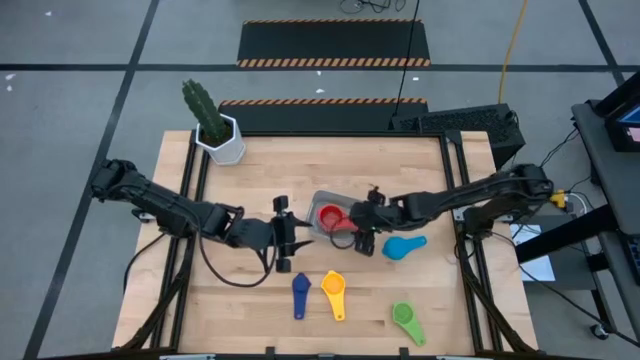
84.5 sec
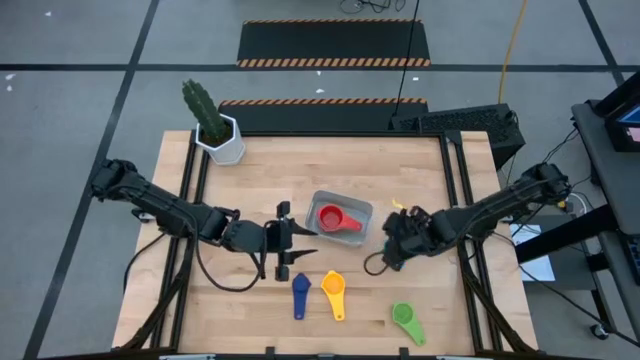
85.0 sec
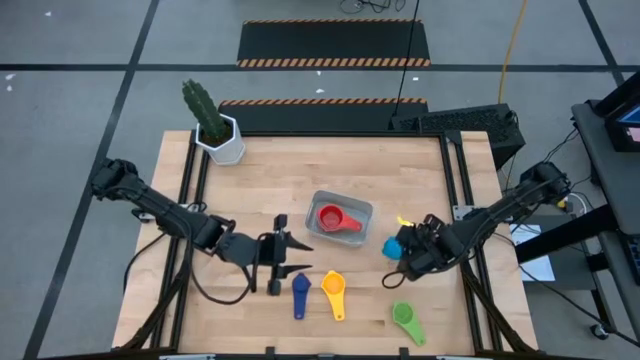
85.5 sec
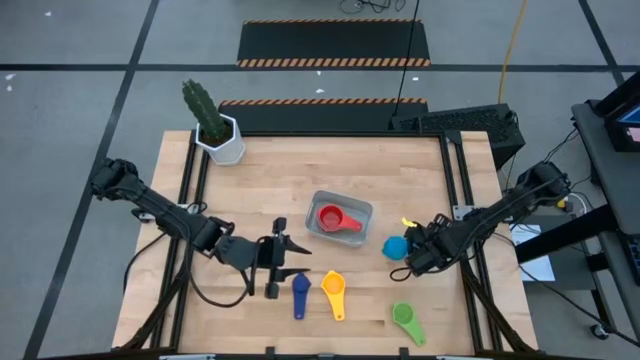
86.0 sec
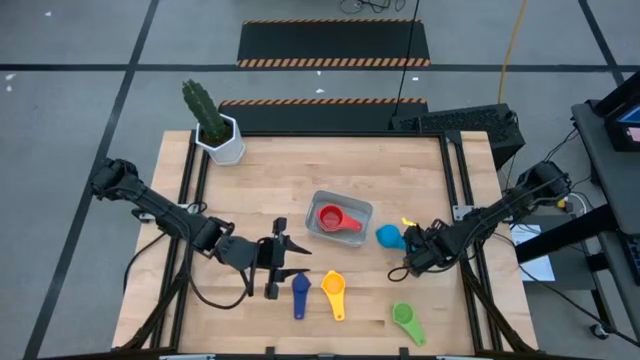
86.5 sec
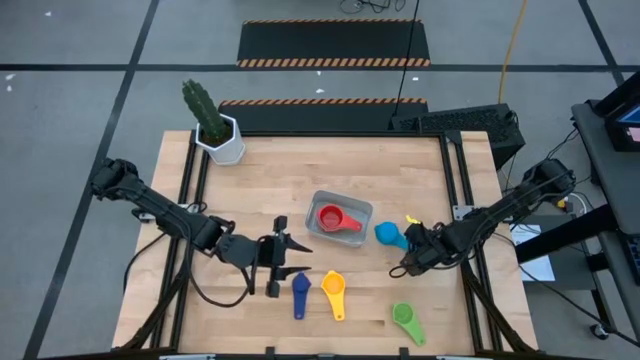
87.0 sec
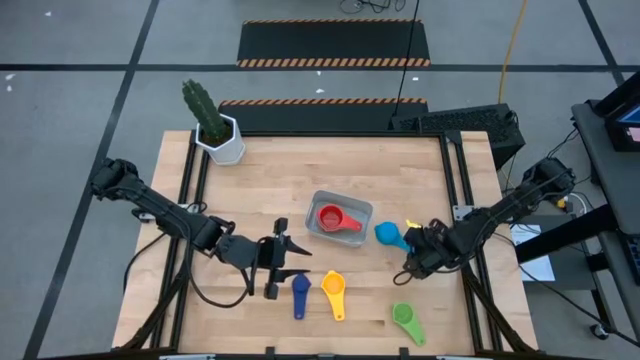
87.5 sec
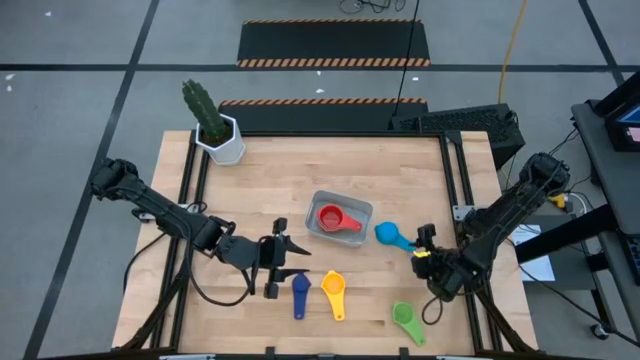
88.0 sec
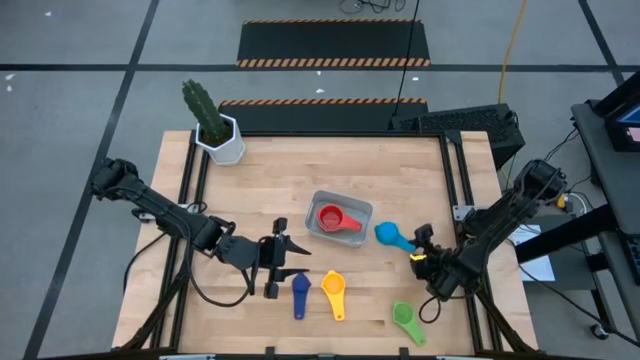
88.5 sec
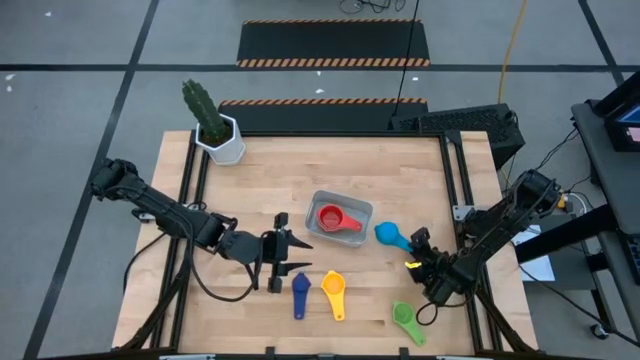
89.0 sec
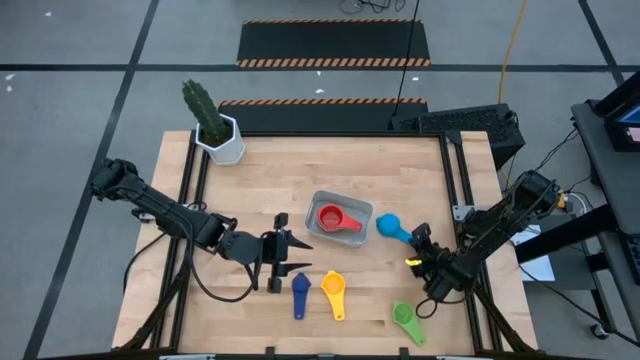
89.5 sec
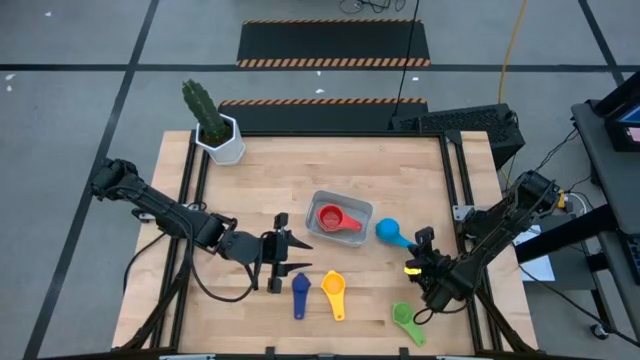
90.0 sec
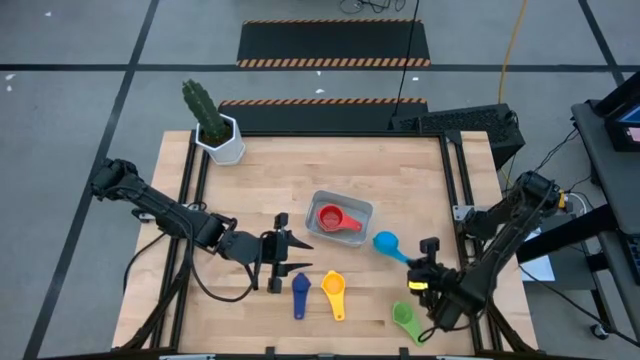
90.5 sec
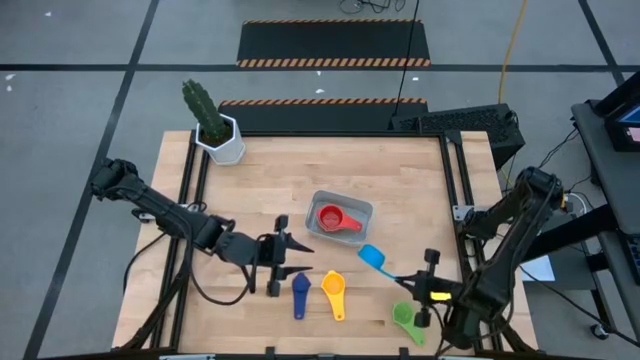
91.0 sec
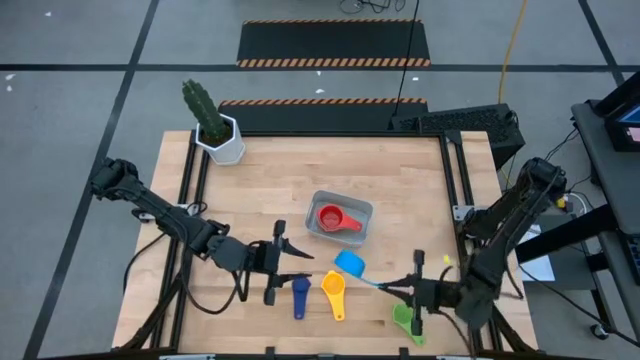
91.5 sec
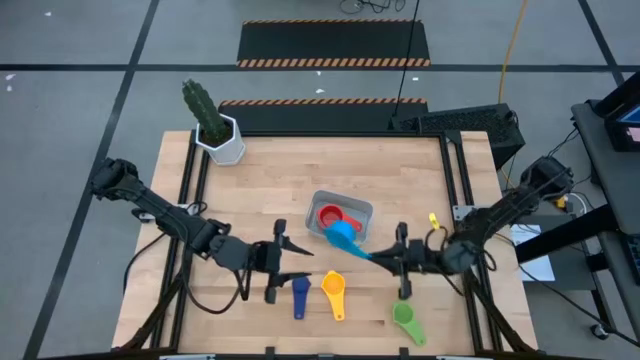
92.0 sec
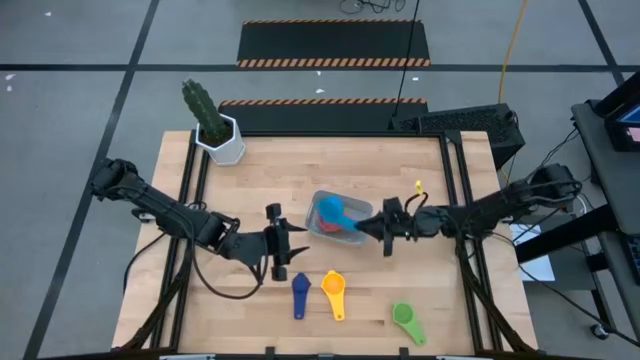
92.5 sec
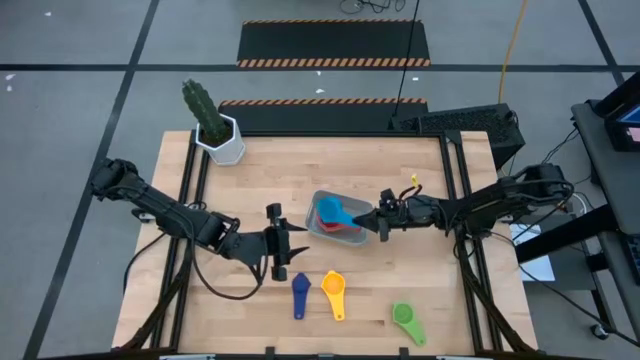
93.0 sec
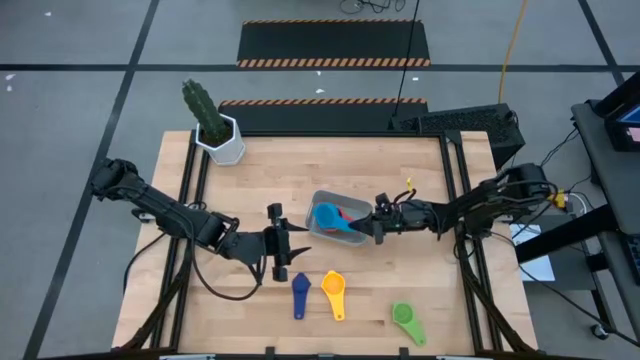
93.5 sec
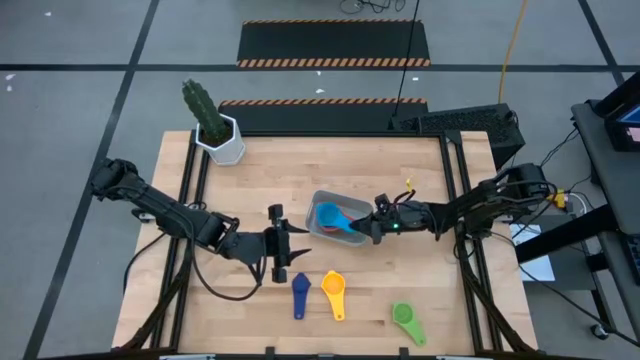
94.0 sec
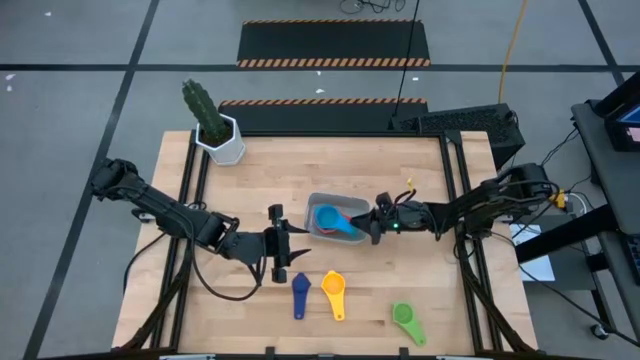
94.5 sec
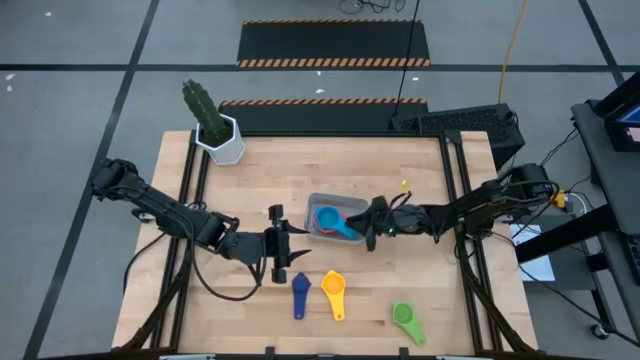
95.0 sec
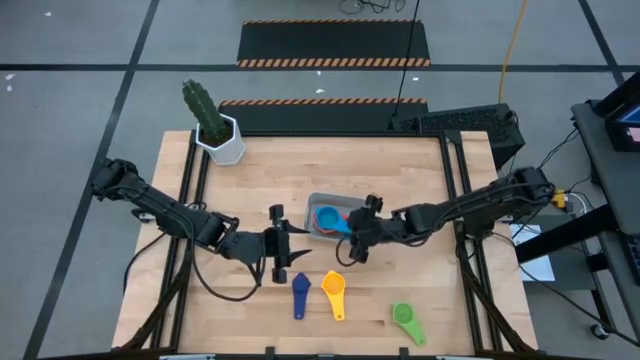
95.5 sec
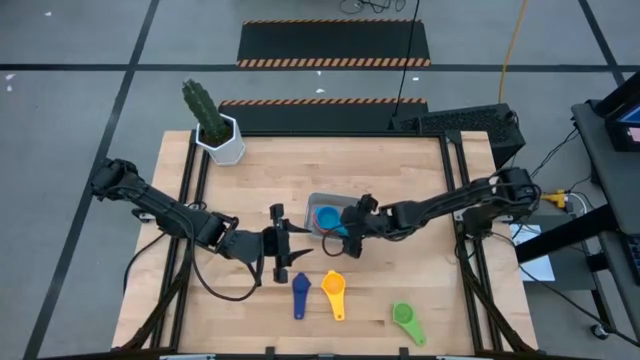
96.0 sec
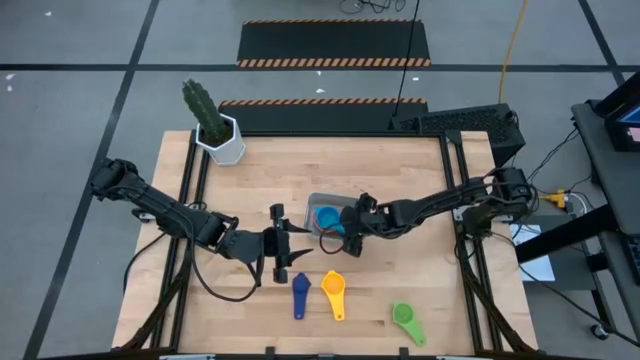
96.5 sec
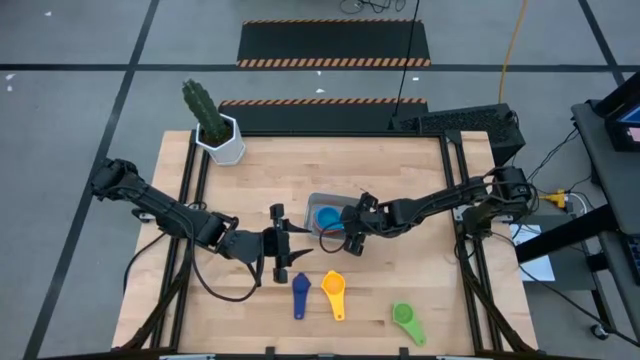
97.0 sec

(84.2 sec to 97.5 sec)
Task: Nest measuring cups in basket
Stack the light blue measuring cup into the red measuring cup

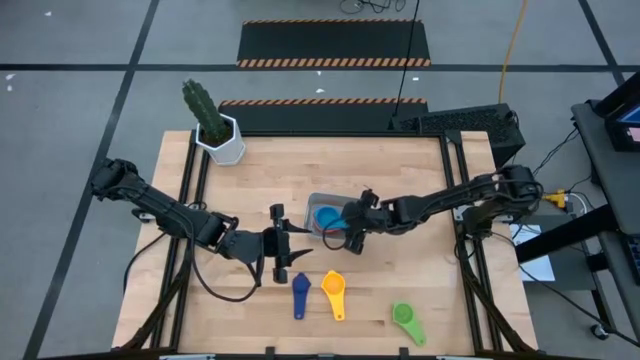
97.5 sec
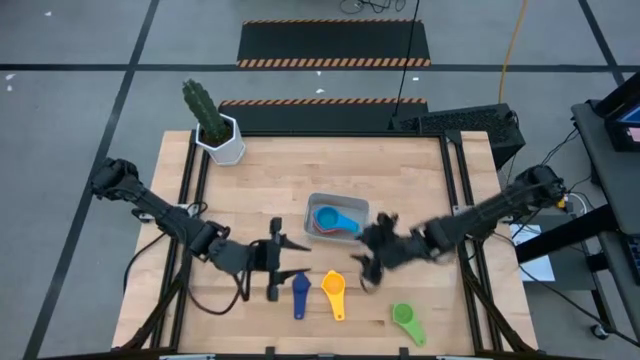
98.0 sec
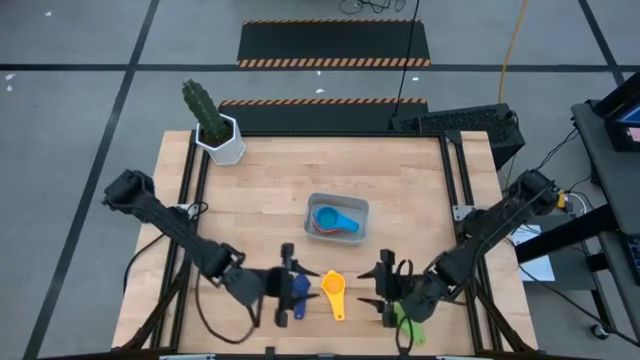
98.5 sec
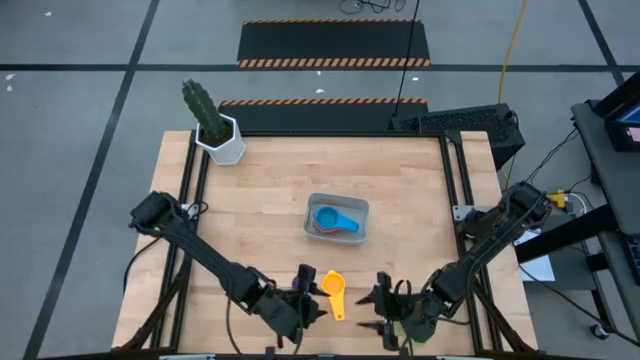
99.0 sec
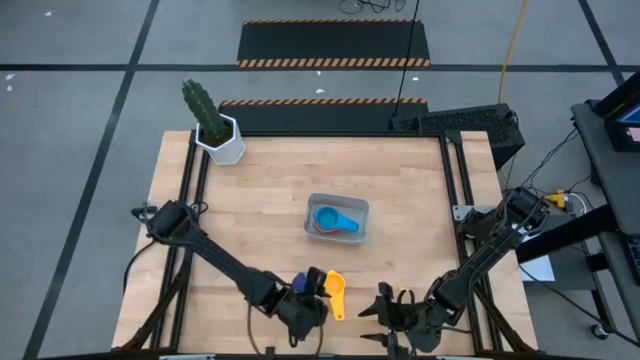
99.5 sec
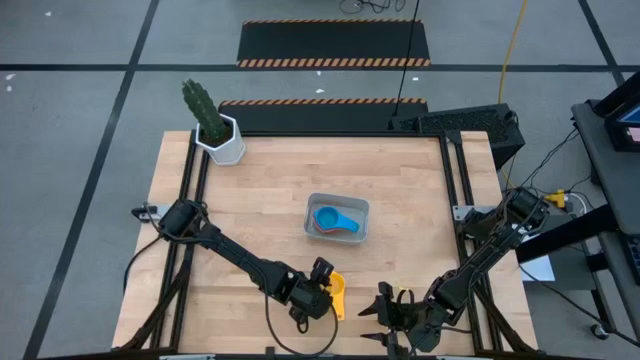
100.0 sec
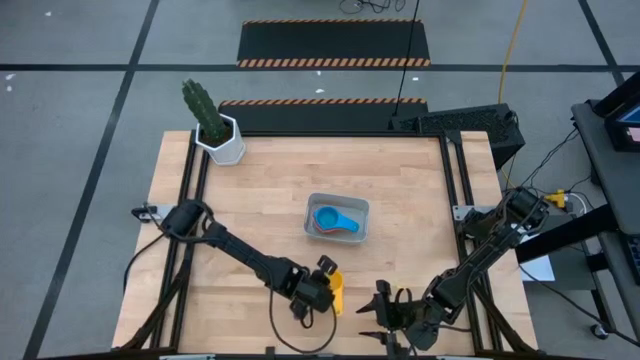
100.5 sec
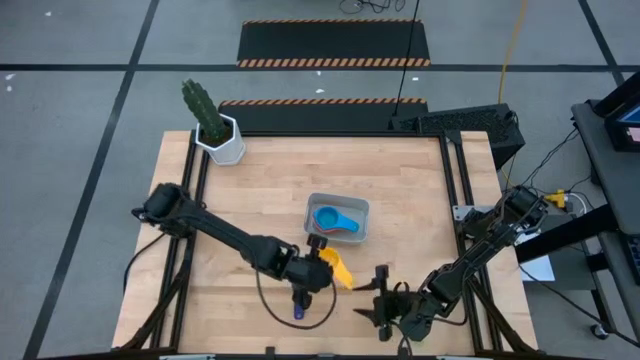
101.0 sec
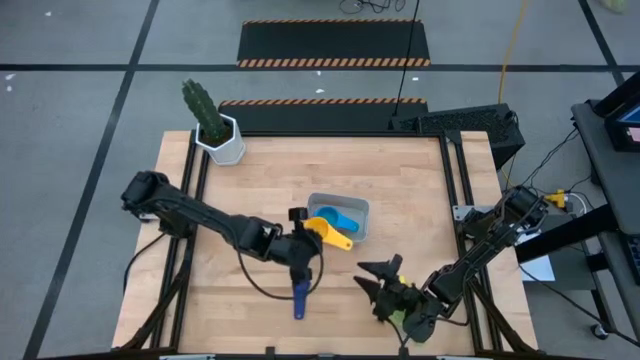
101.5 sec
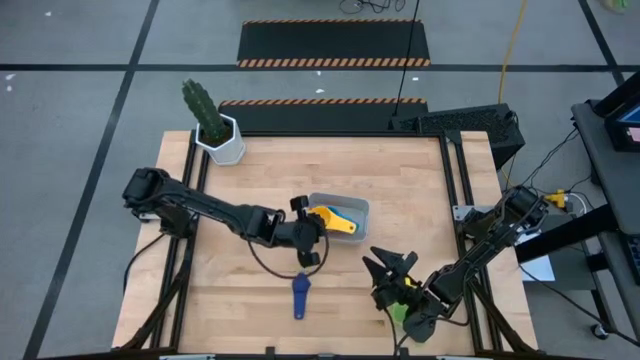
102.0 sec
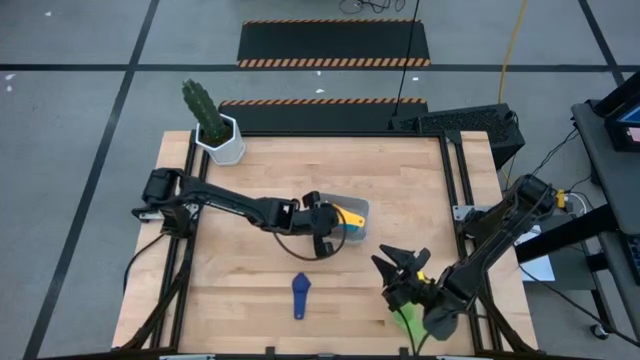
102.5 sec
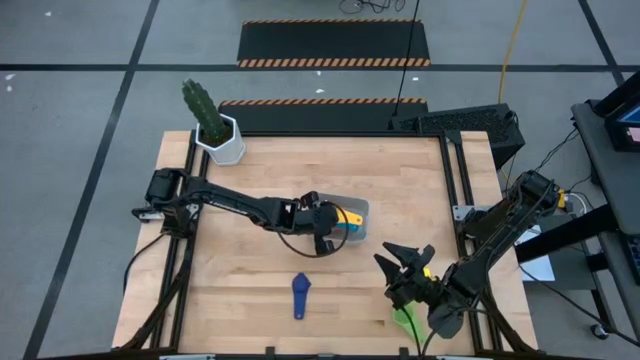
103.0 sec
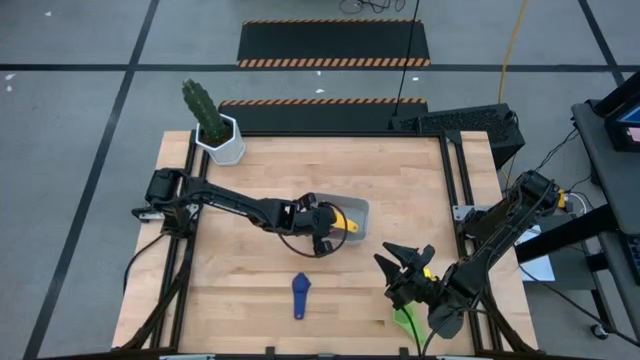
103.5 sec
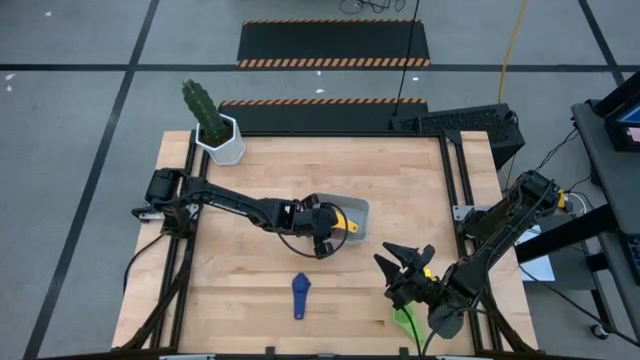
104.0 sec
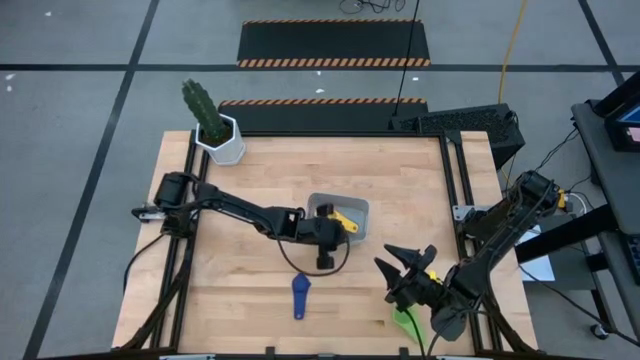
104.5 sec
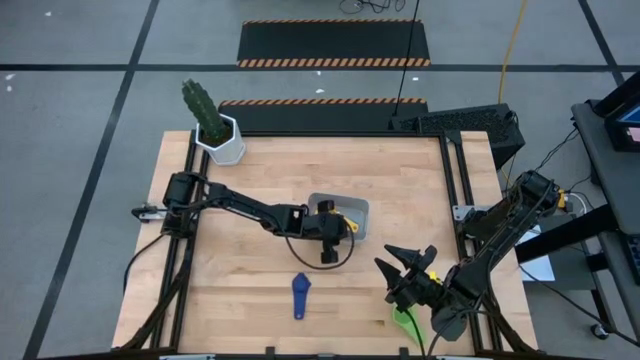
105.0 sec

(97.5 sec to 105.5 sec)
Stack the yellow measuring cup into the light blue measuring cup

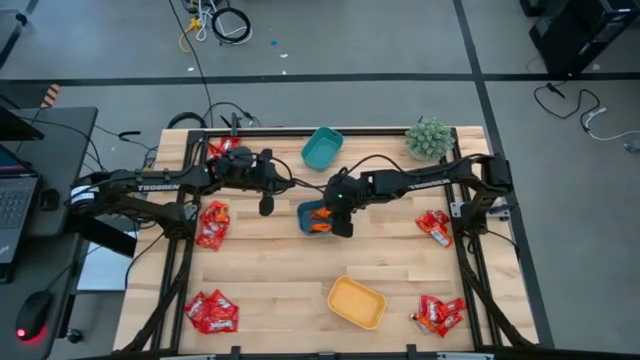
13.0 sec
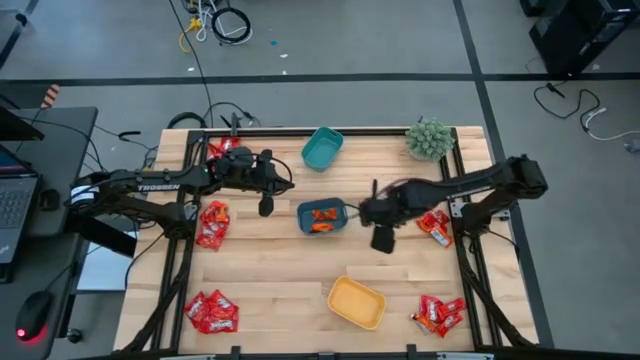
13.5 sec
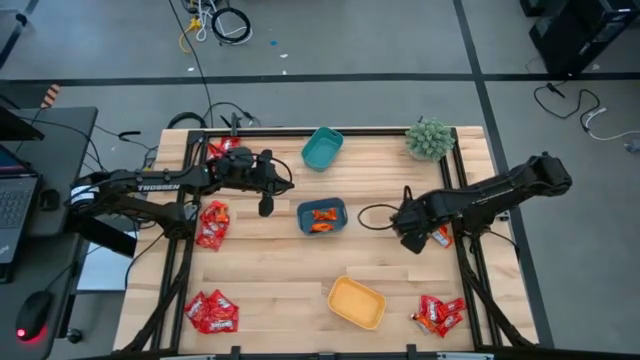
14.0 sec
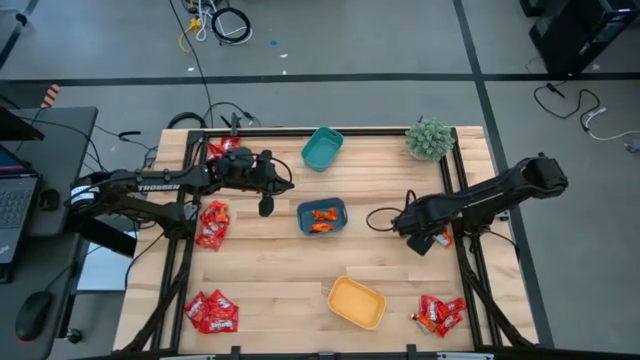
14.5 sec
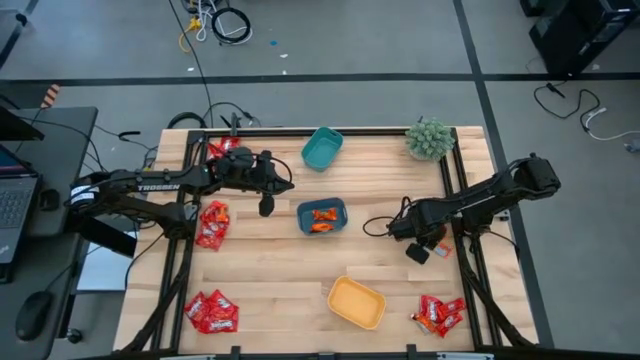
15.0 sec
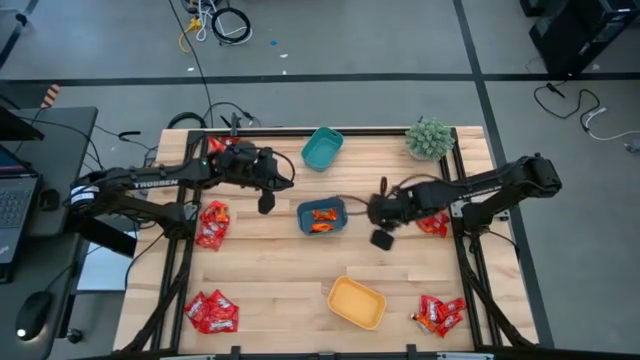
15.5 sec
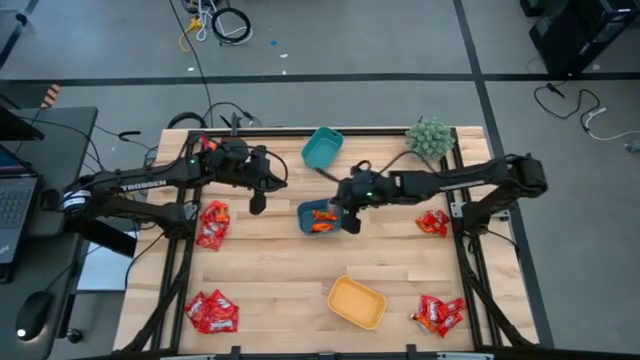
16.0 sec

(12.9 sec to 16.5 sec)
Task: Sort candy
Put the orange chocolate into the blue bin
